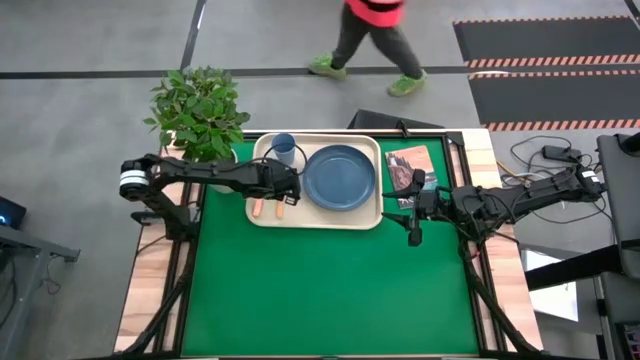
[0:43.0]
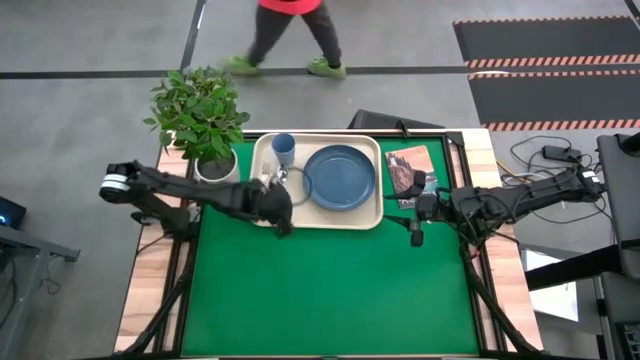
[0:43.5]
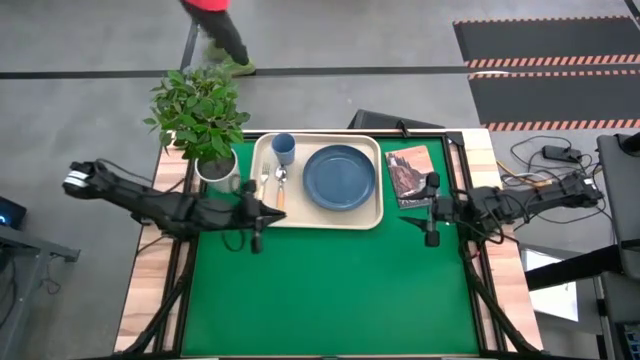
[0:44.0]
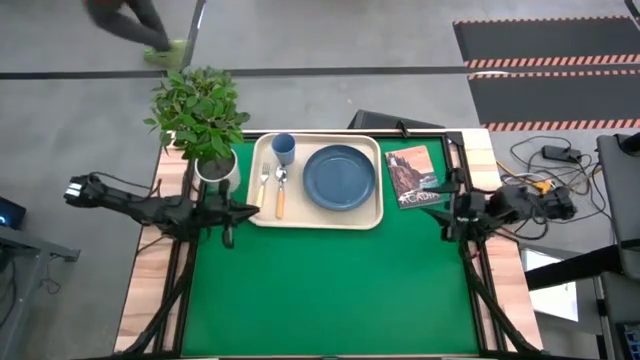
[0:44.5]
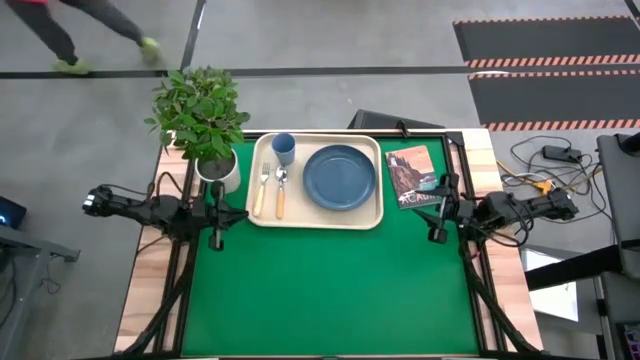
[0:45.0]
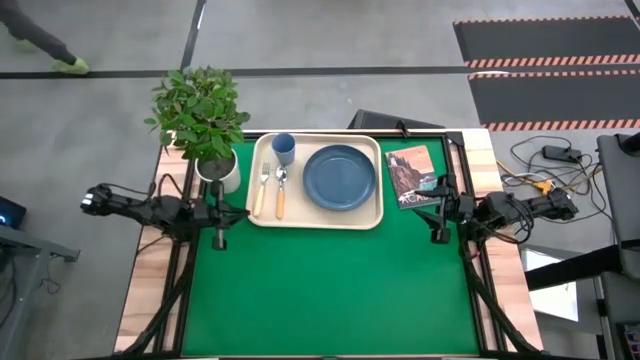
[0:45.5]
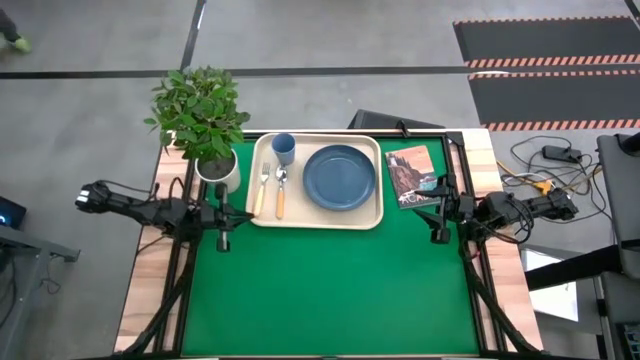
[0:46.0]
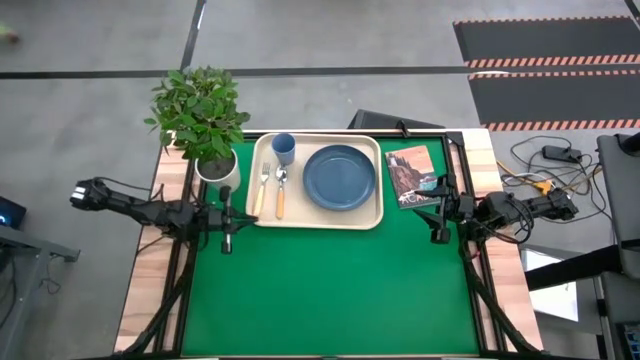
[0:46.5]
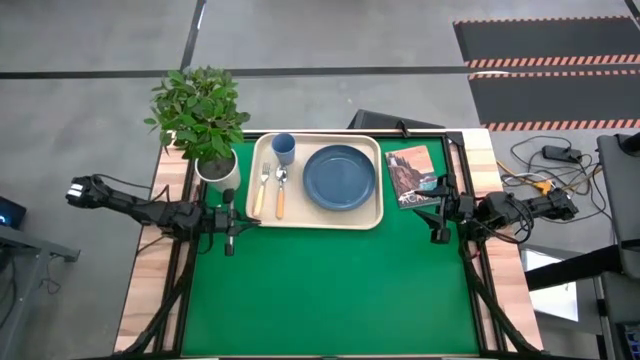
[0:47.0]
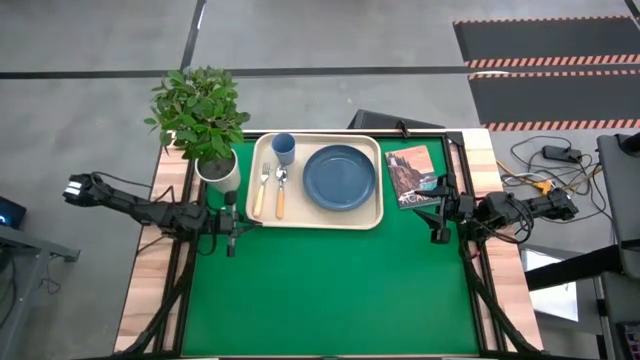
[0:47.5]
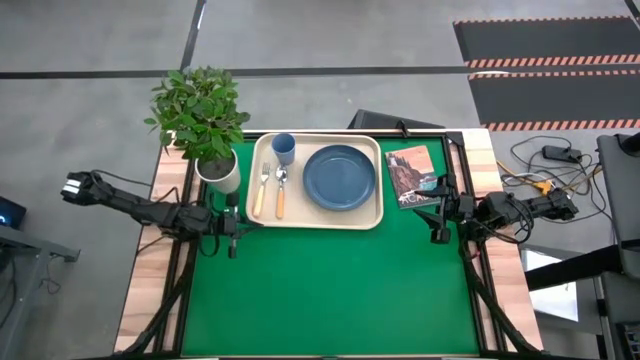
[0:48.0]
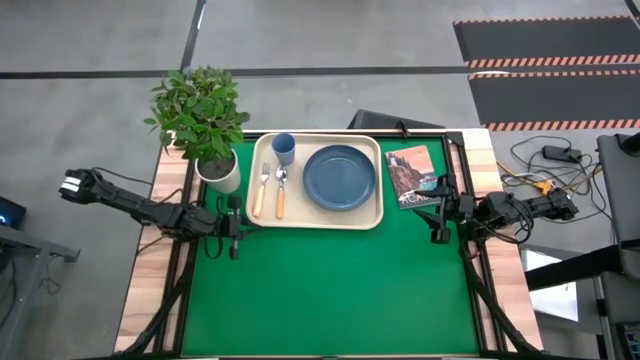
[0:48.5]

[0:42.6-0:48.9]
Task: Pick and place plate/cup/fork/spoon on tray
Return to Home Position

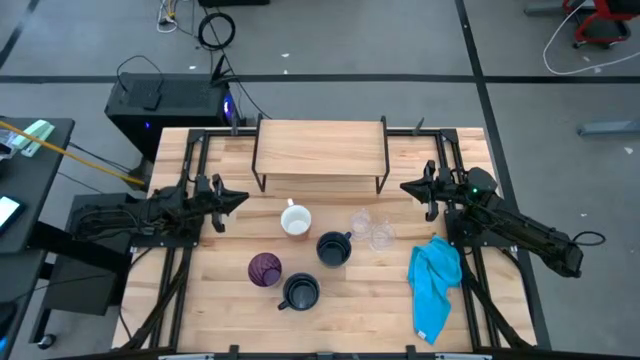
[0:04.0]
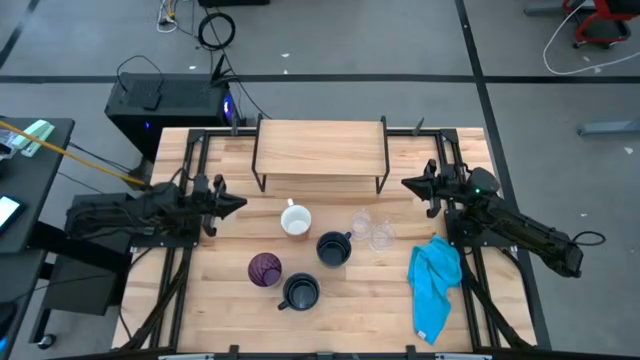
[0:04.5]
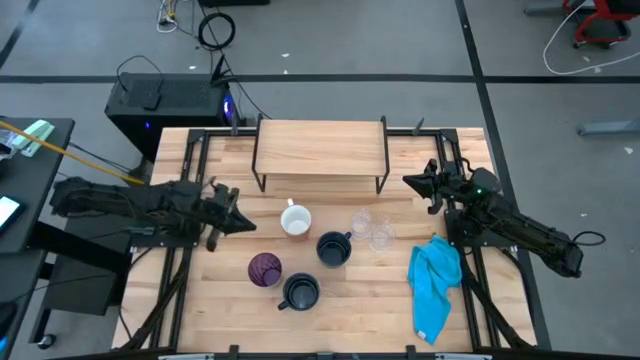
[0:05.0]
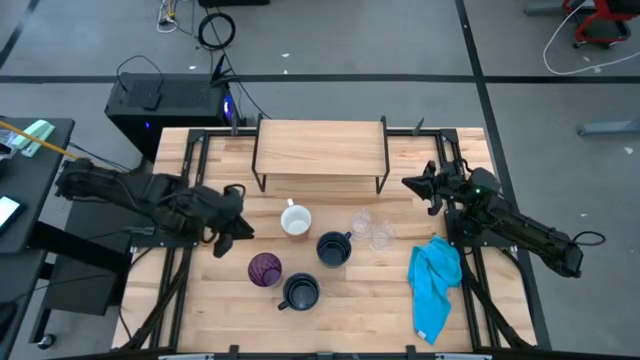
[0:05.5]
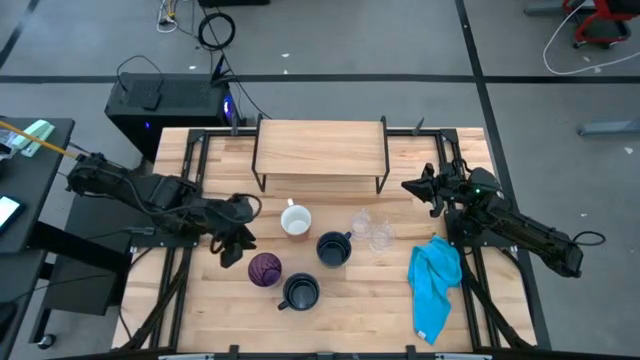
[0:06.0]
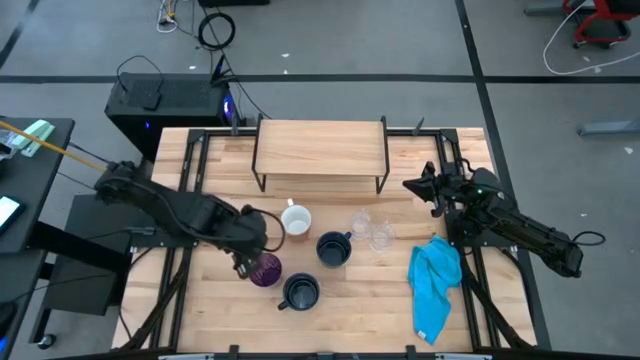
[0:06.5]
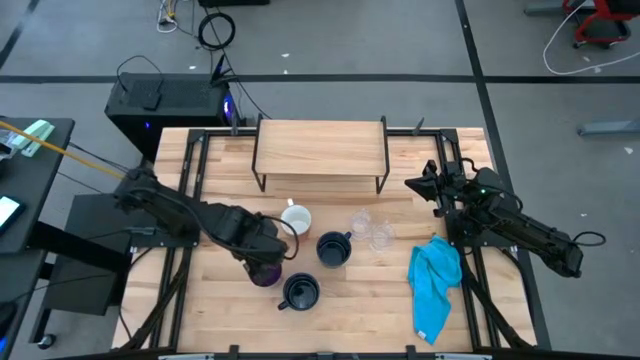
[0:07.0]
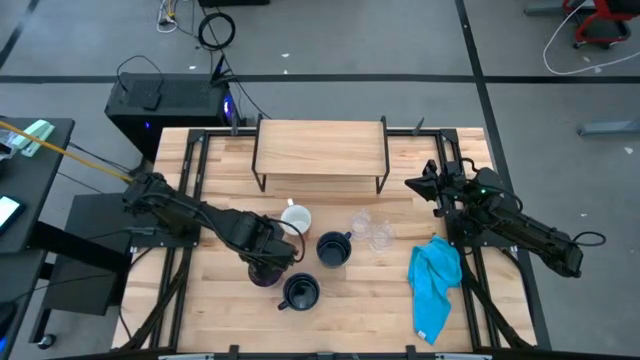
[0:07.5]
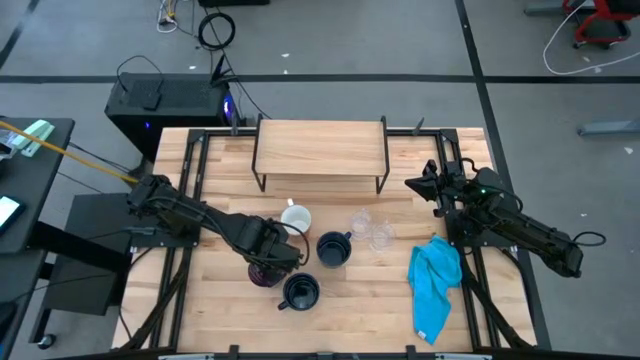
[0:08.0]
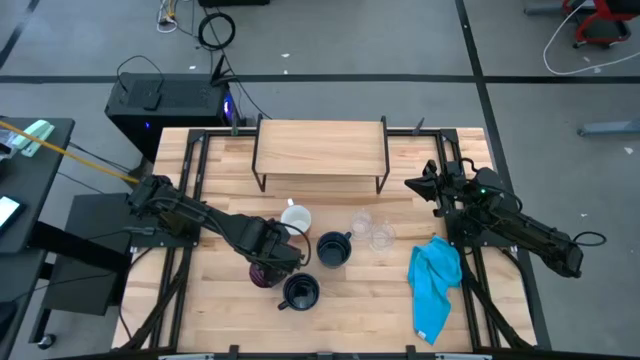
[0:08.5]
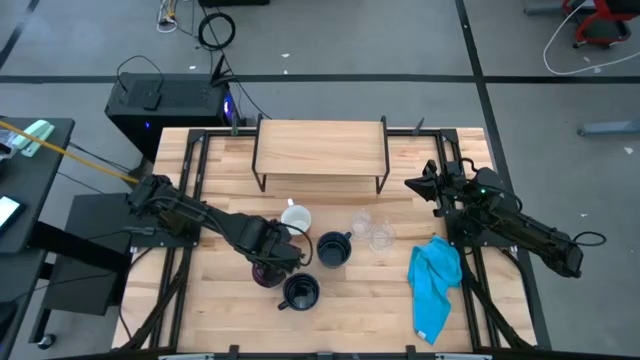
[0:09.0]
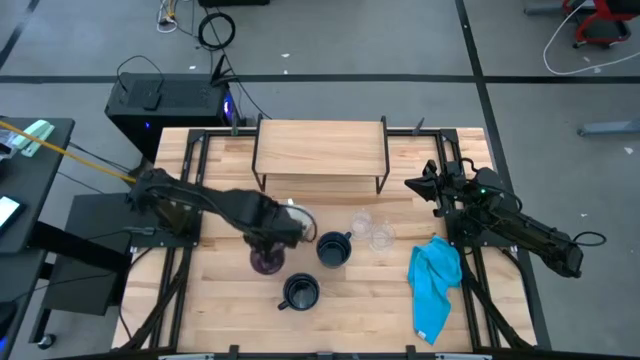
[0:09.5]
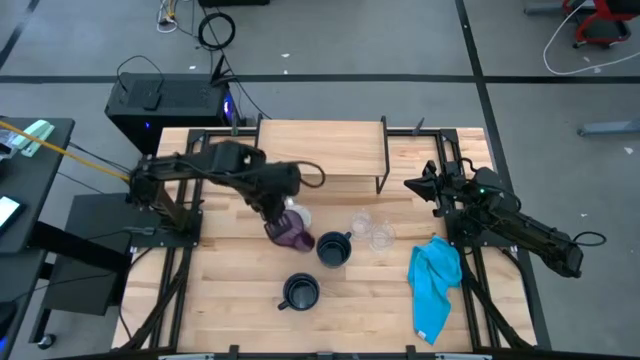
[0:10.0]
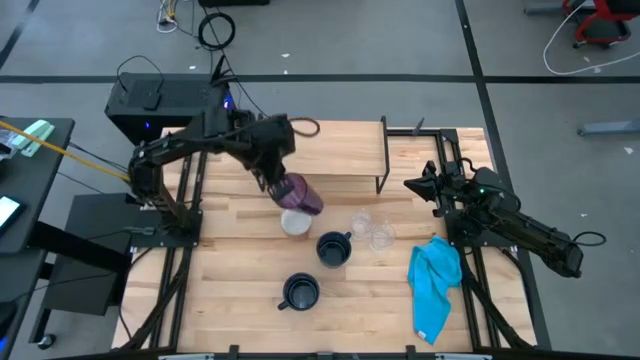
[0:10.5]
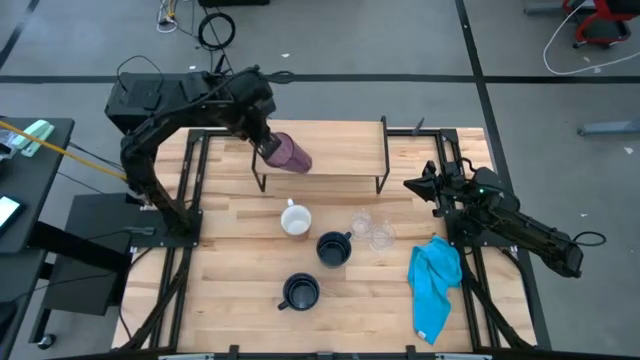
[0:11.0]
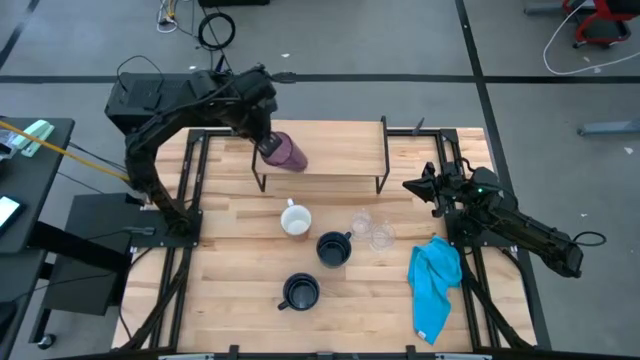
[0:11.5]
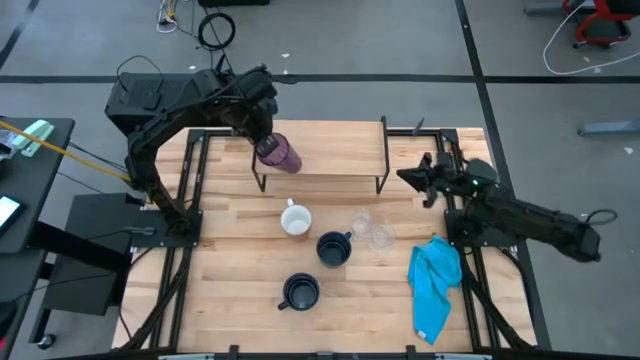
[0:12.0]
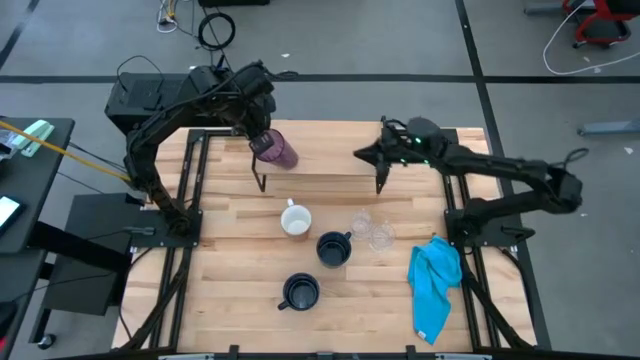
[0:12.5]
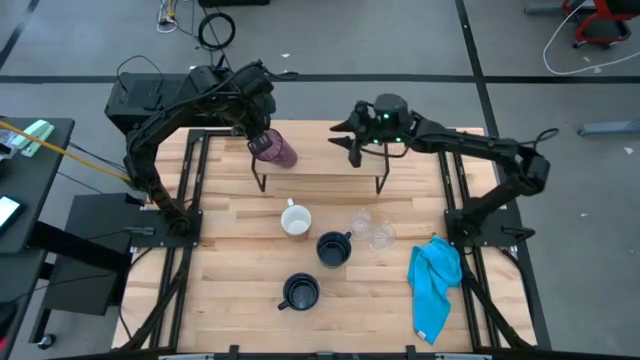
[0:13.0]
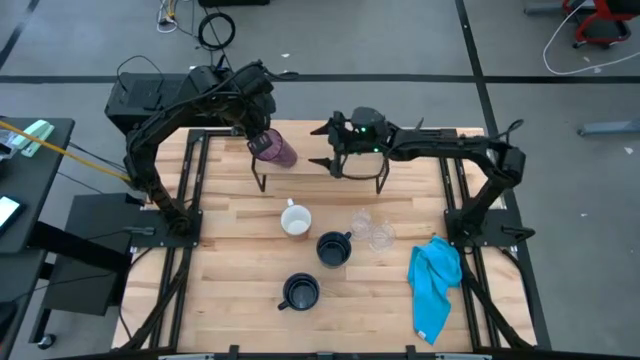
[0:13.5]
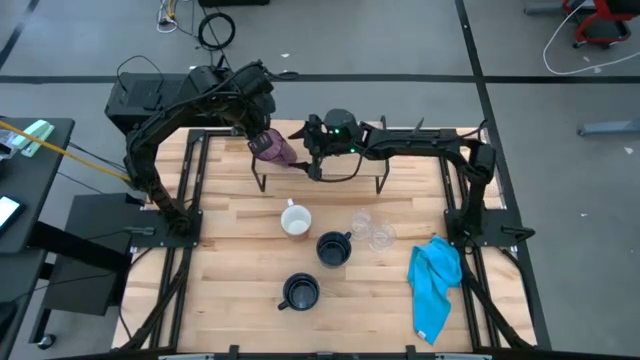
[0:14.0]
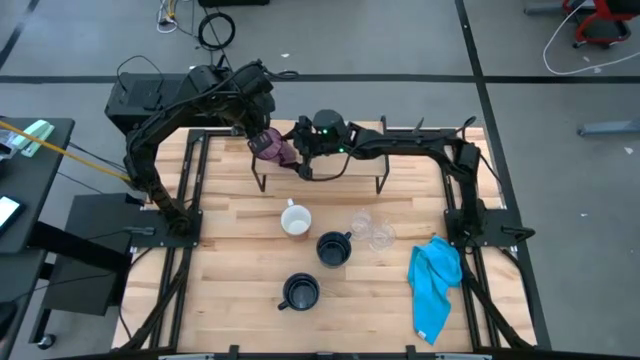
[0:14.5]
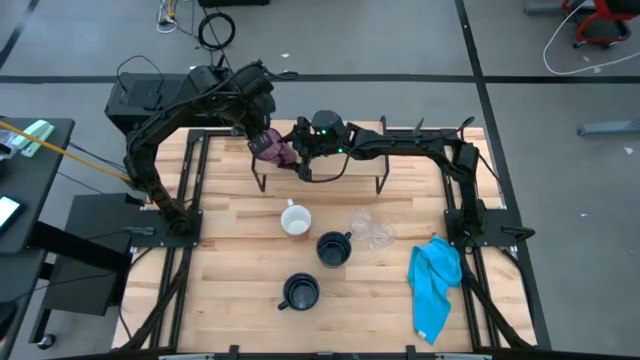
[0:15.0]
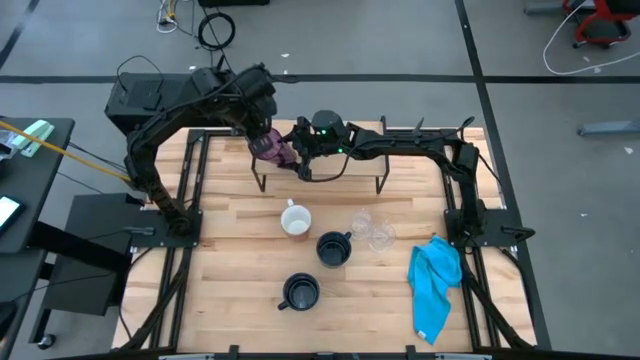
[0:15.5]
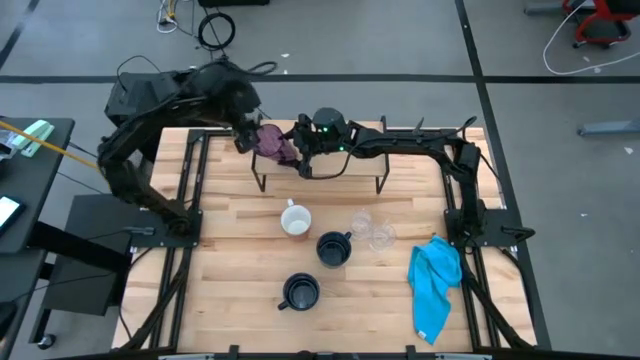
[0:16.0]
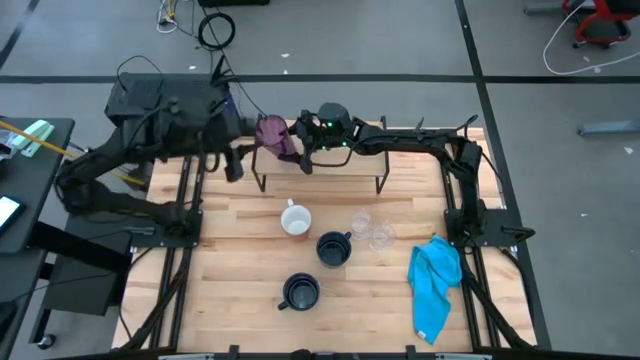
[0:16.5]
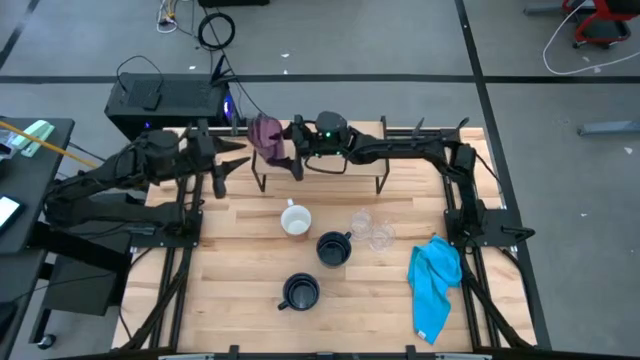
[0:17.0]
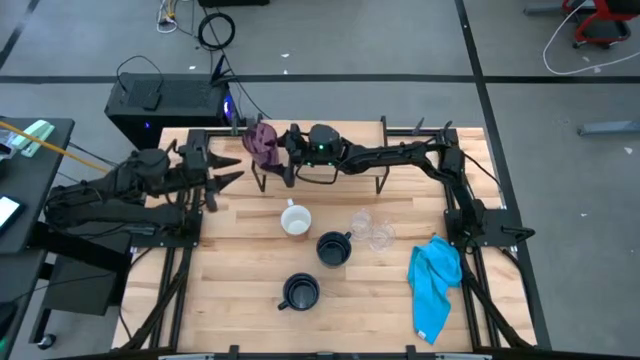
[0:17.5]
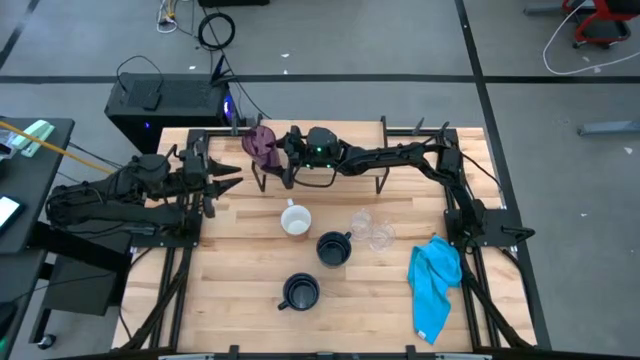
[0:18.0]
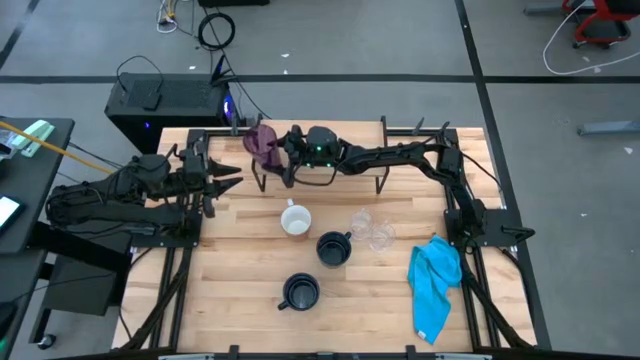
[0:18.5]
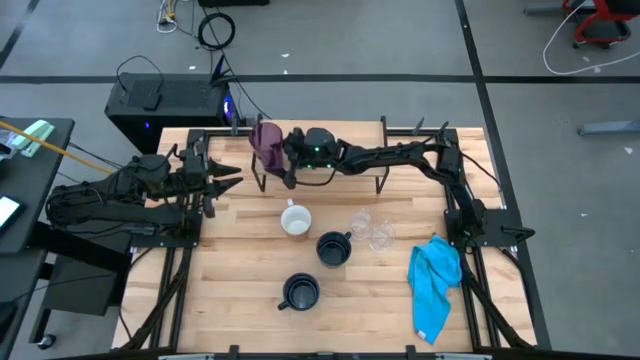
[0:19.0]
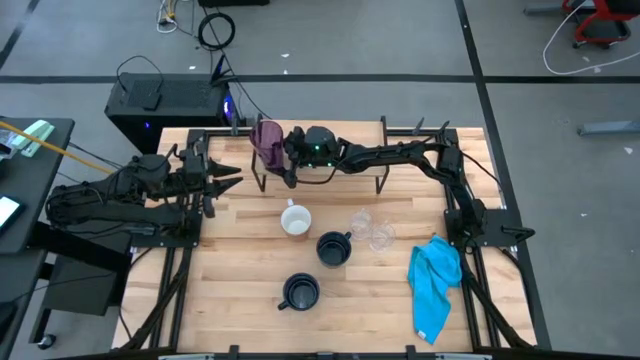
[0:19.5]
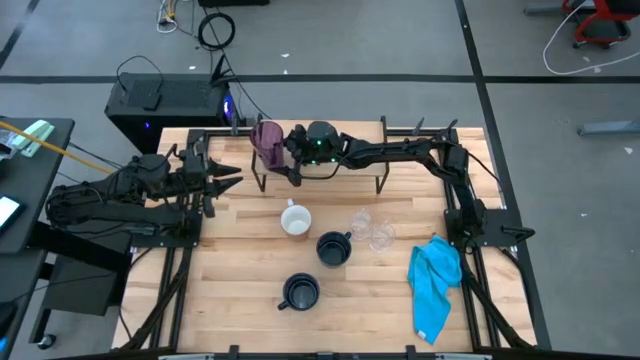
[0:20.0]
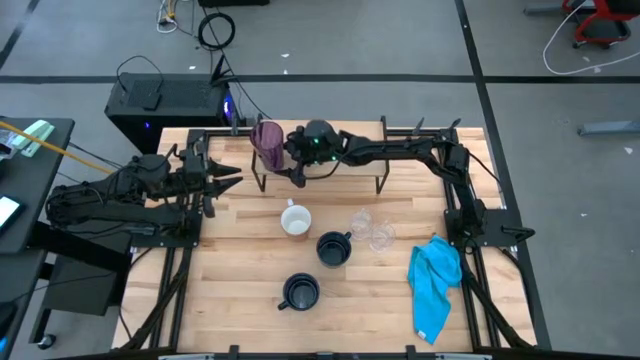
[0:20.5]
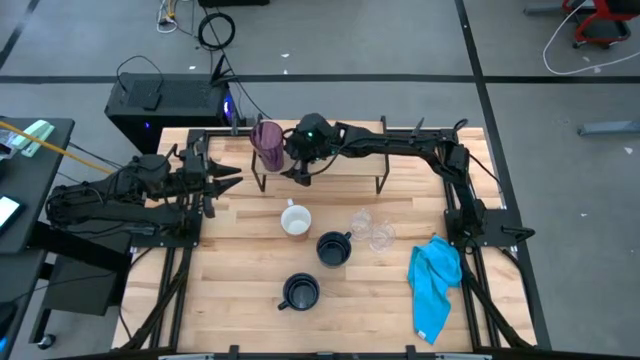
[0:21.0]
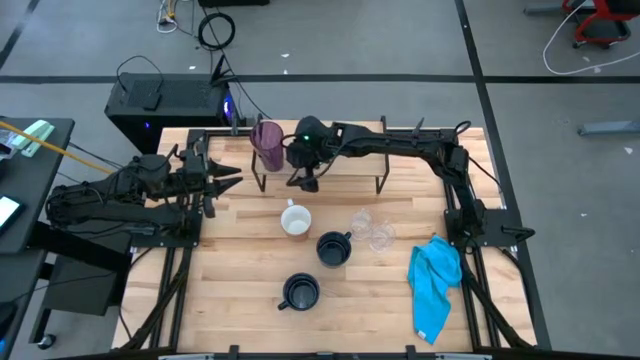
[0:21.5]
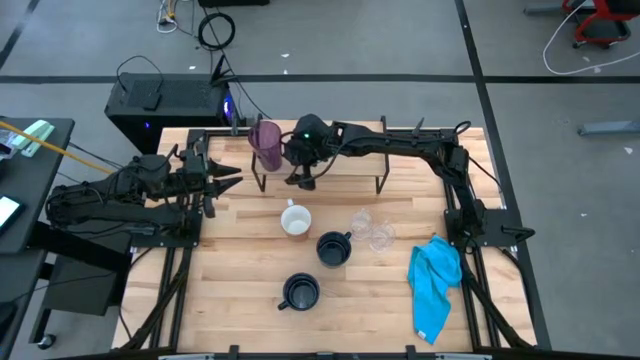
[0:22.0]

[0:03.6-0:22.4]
Task: Stack small to large cups/mugs on shelf
Put the violet cup on the shelf
